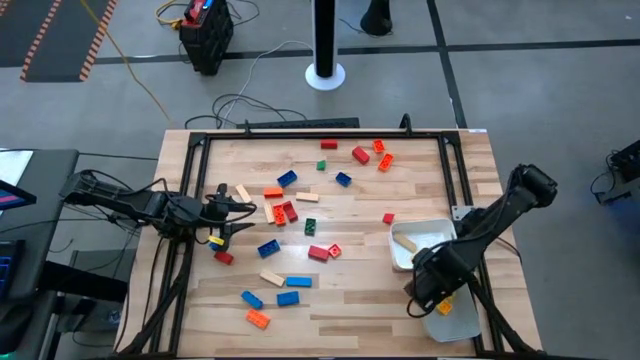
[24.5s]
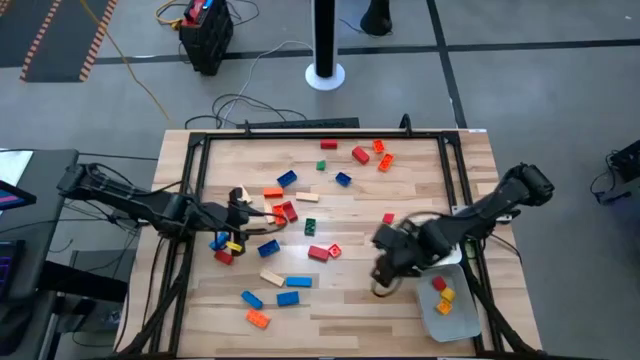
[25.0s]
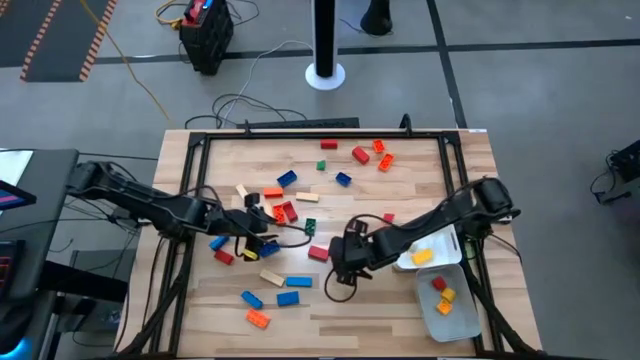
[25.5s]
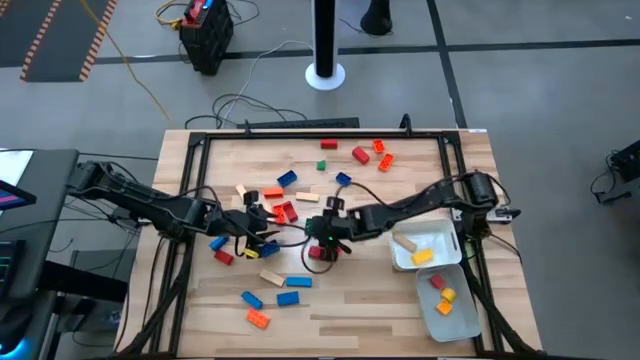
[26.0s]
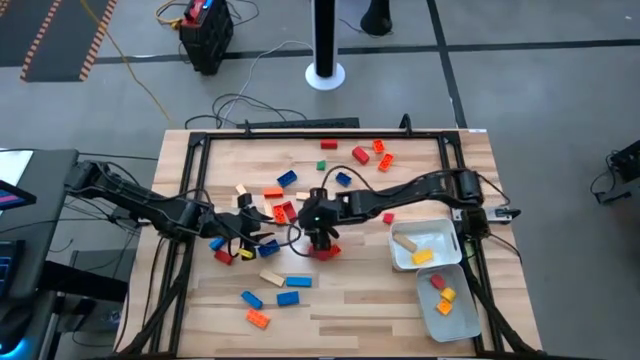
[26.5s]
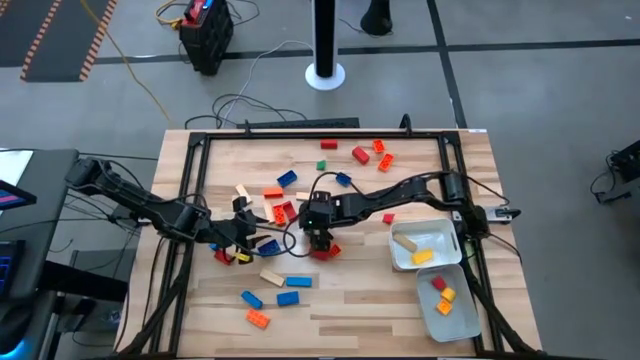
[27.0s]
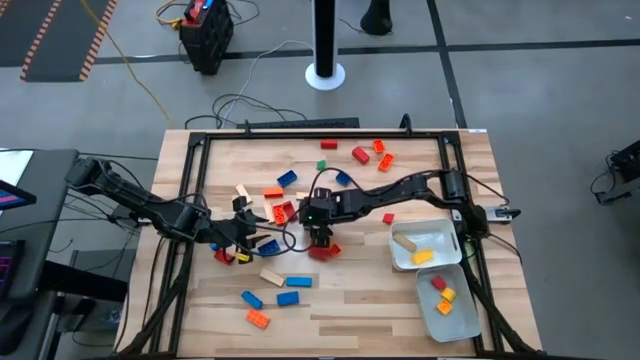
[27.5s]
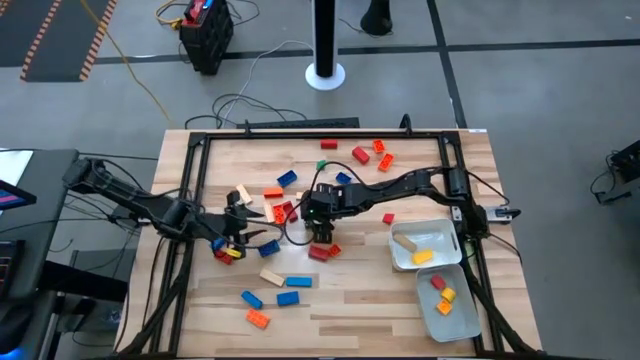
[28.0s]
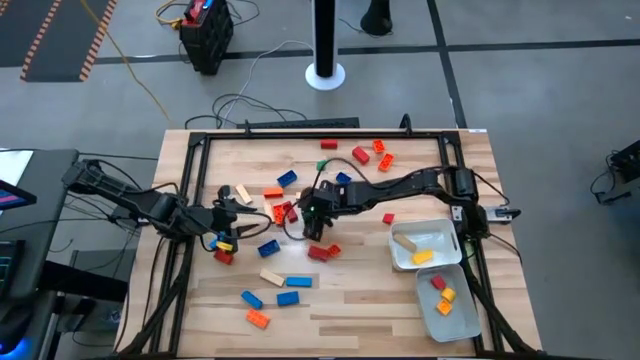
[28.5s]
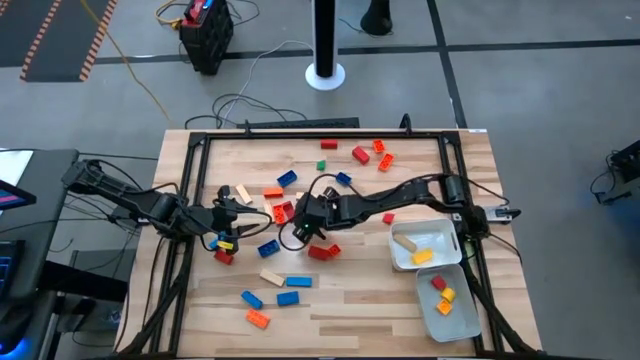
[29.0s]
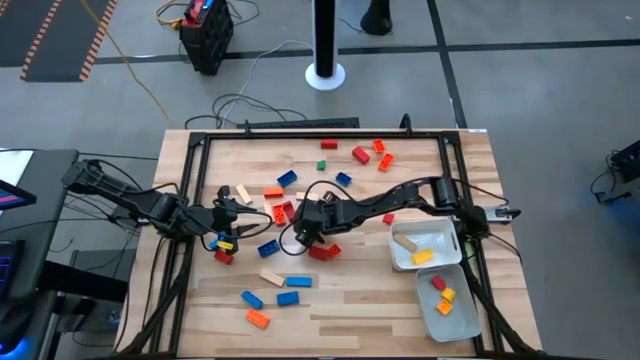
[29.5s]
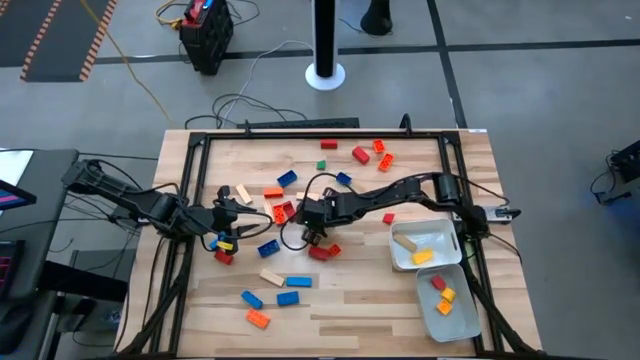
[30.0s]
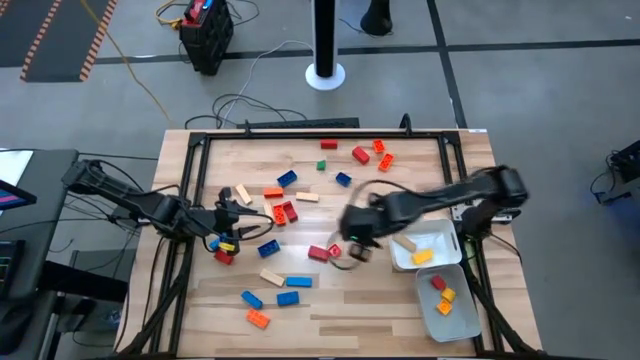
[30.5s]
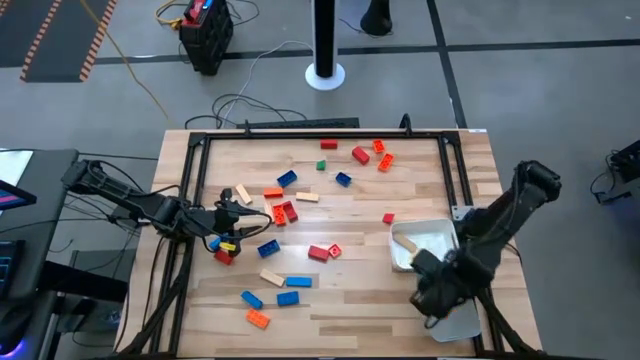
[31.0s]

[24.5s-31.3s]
Task: Sort blocks by size
Put the green 8 stud game piece into the gray bin

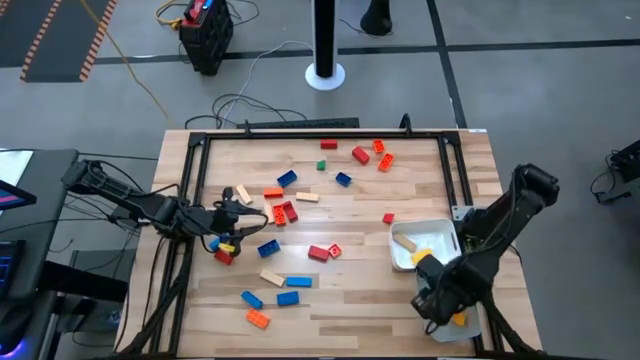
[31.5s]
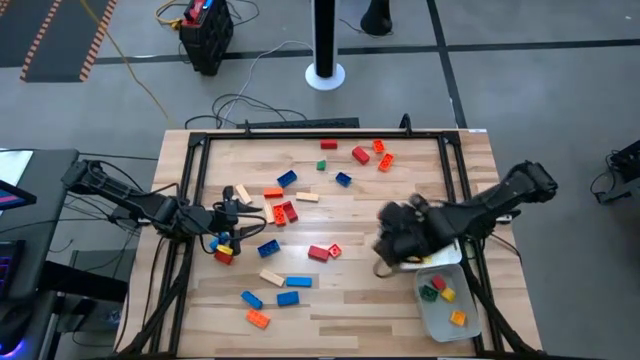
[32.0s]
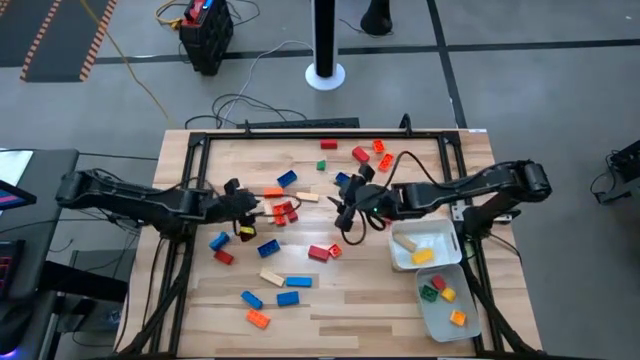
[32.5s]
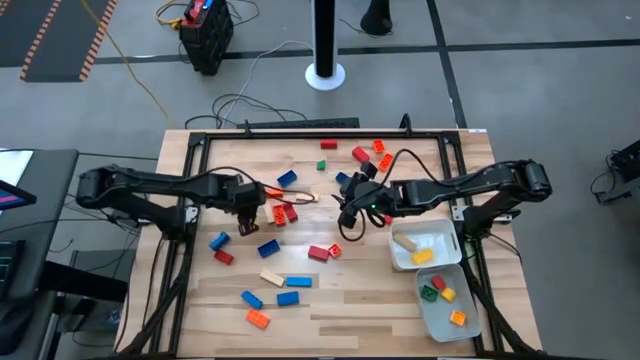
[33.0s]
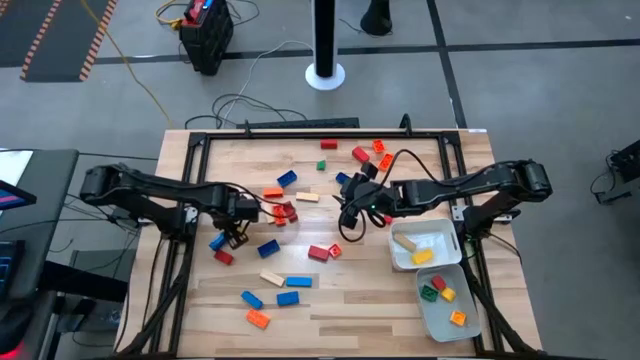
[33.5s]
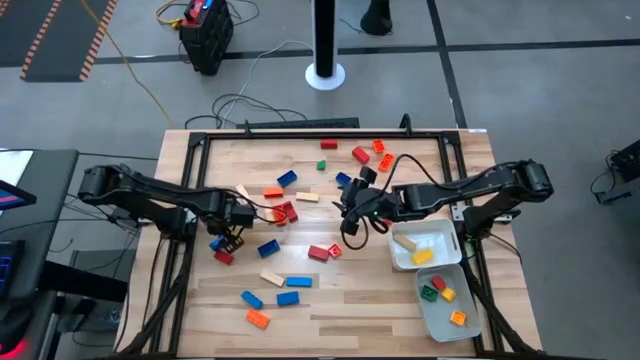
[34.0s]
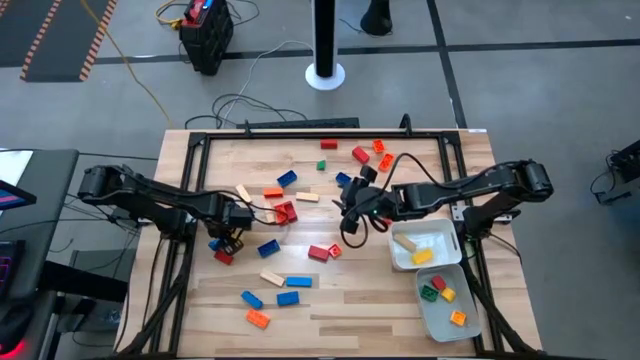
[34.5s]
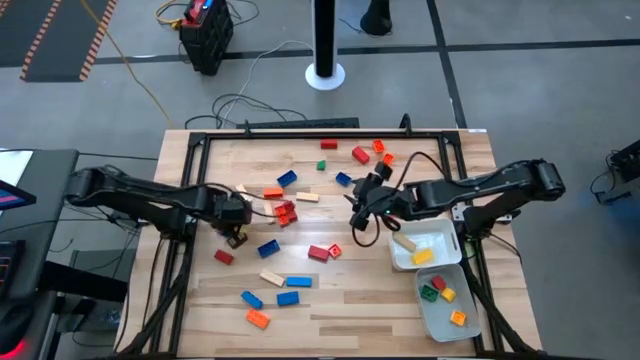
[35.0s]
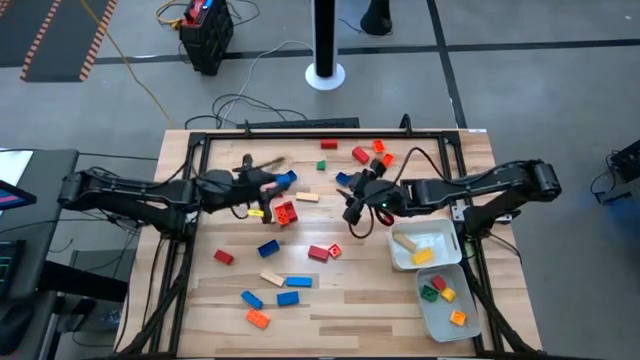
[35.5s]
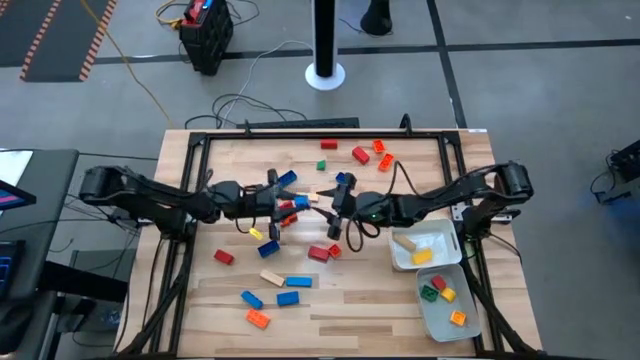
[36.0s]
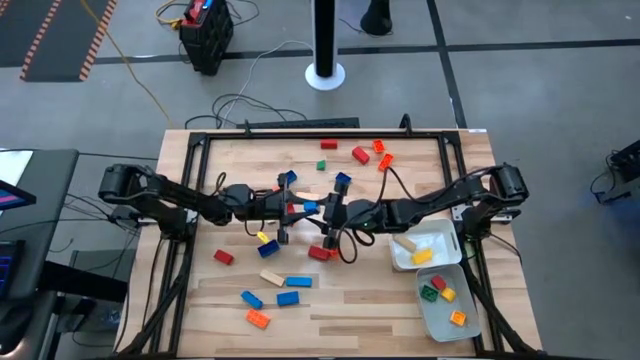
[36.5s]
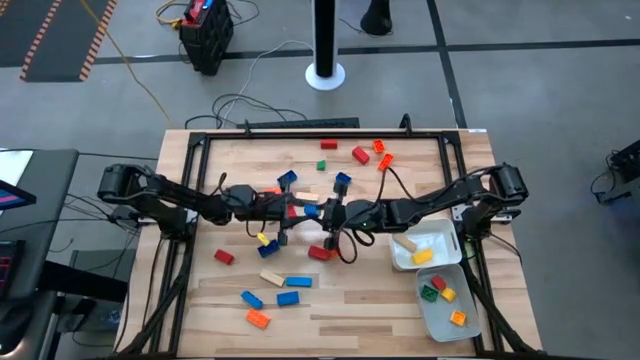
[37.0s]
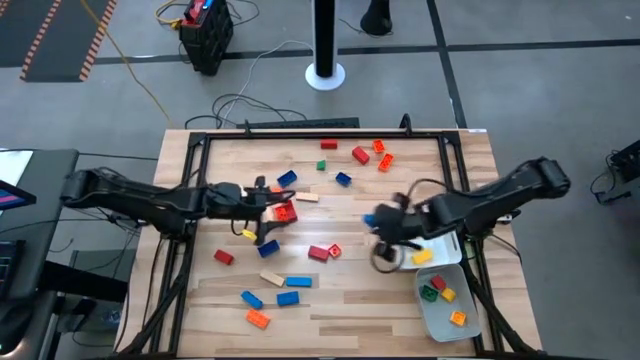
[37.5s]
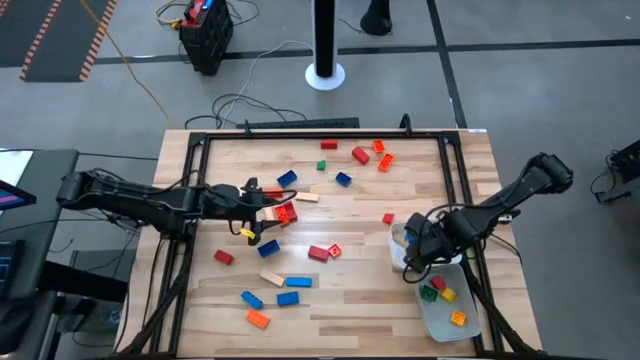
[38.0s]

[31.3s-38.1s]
Put the 8 stud blue game piece into the white bin

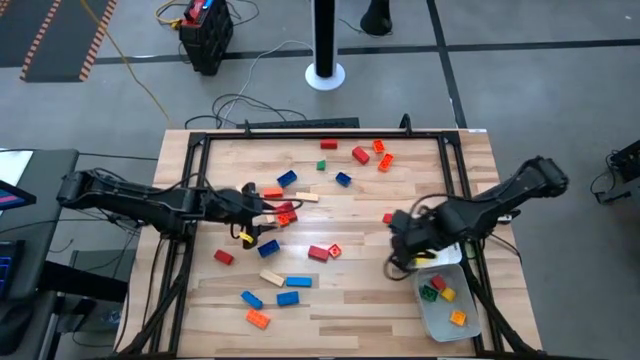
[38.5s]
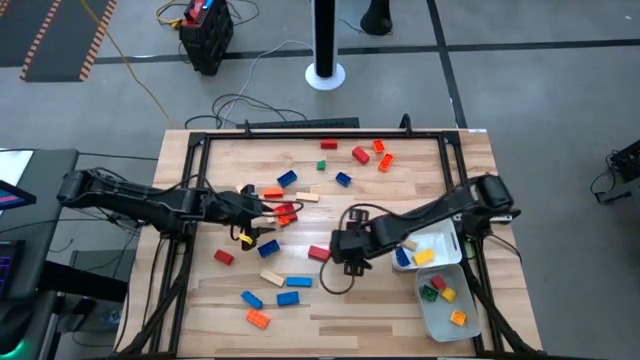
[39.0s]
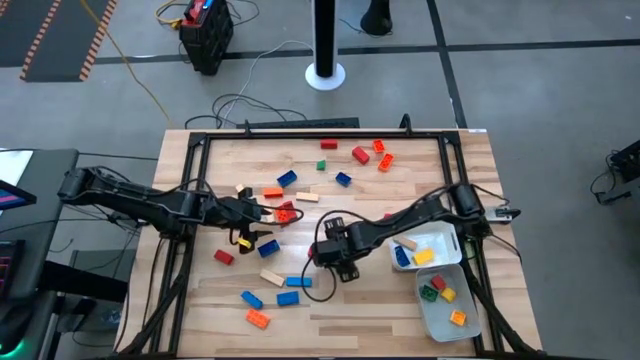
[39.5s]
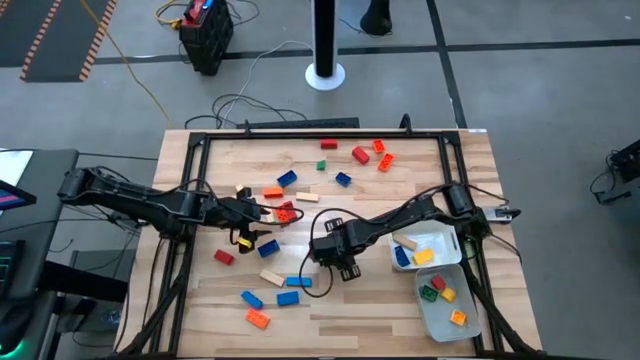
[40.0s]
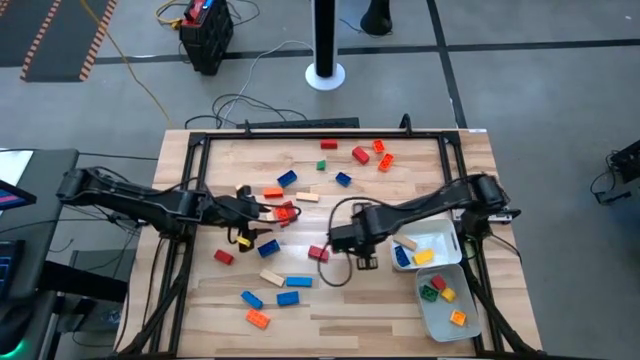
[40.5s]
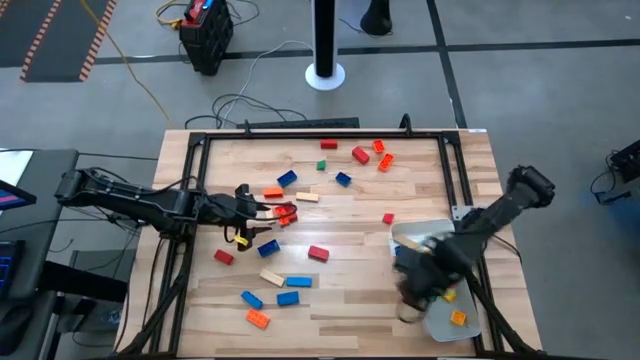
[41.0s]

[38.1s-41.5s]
Put the 4 stud orange game piece into the gray bin

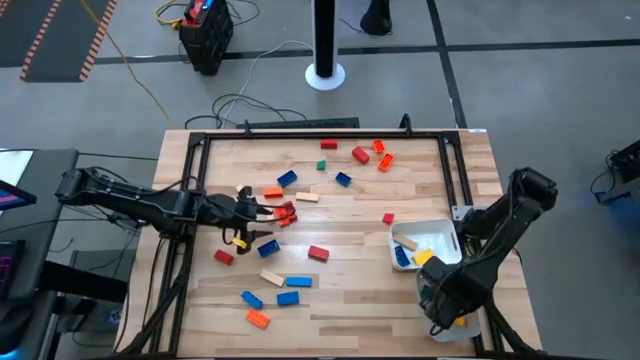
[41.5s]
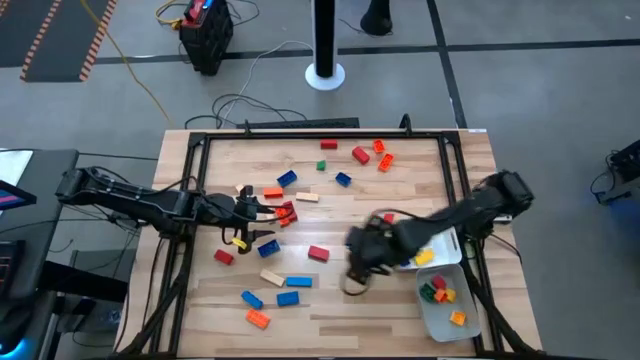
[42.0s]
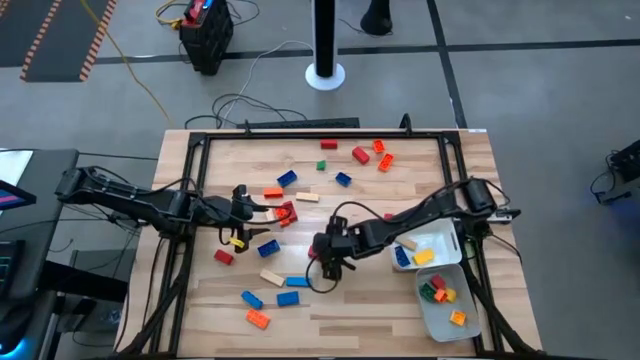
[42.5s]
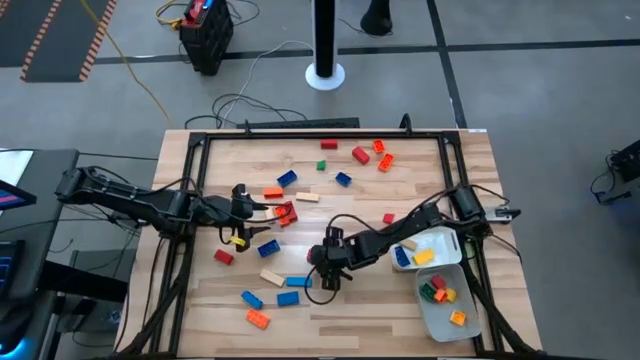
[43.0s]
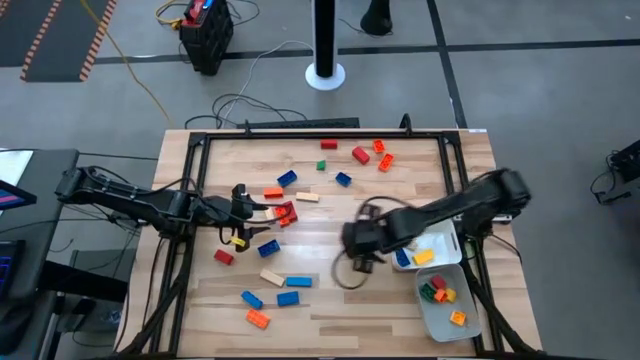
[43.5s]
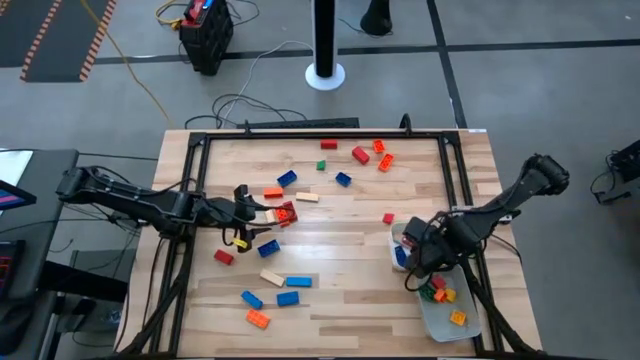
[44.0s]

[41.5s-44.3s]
Put the red block into the white bin
